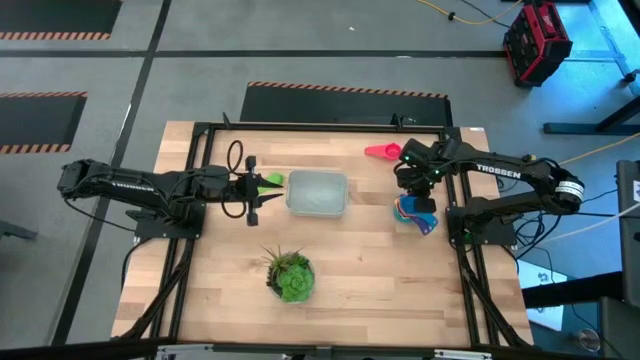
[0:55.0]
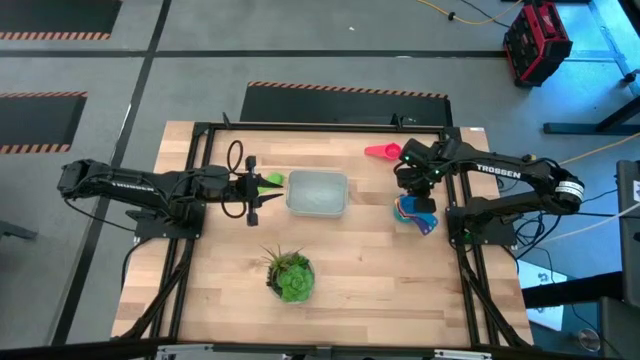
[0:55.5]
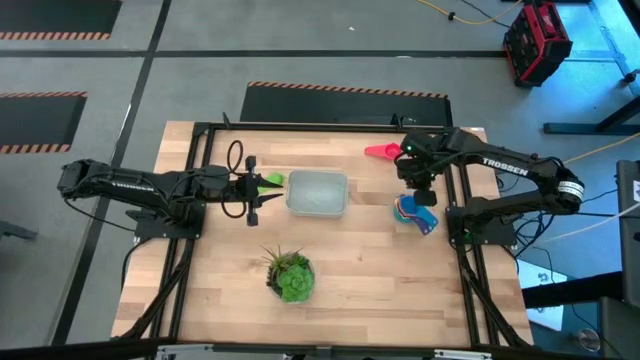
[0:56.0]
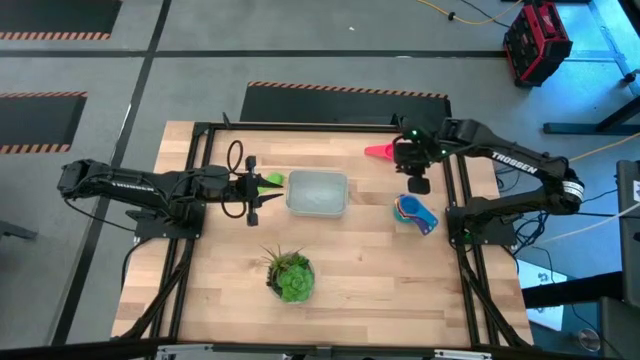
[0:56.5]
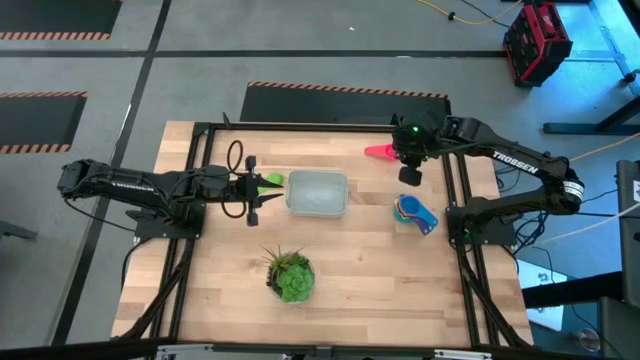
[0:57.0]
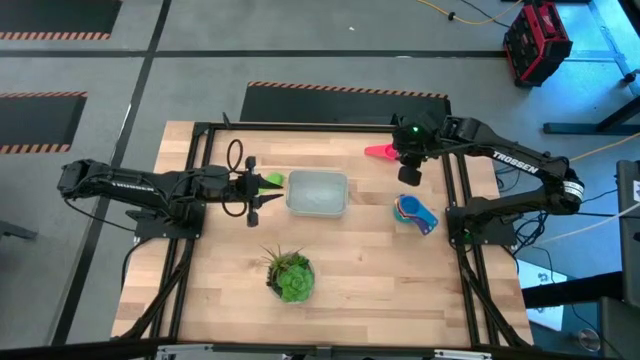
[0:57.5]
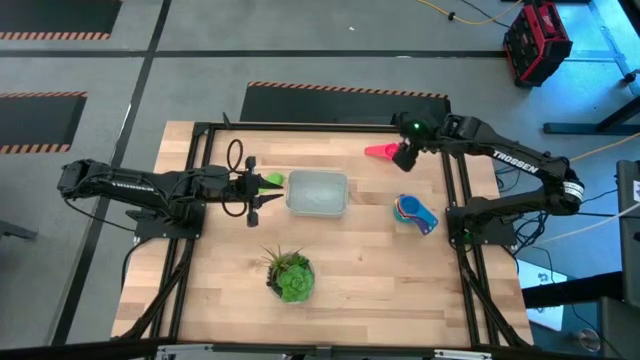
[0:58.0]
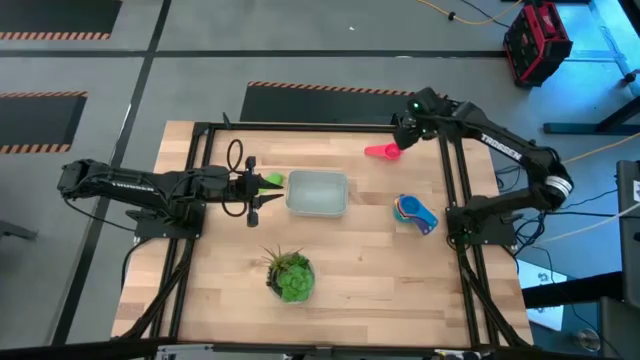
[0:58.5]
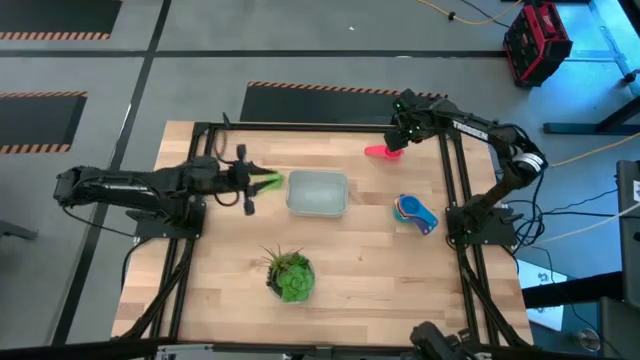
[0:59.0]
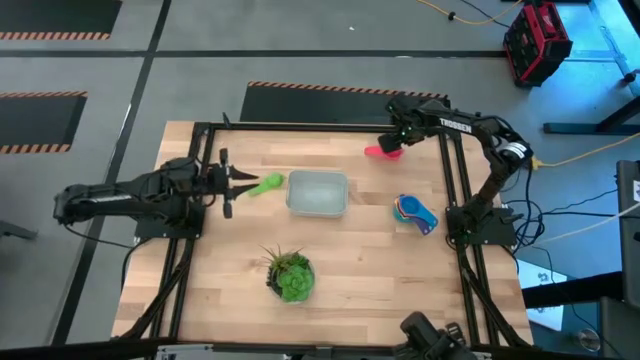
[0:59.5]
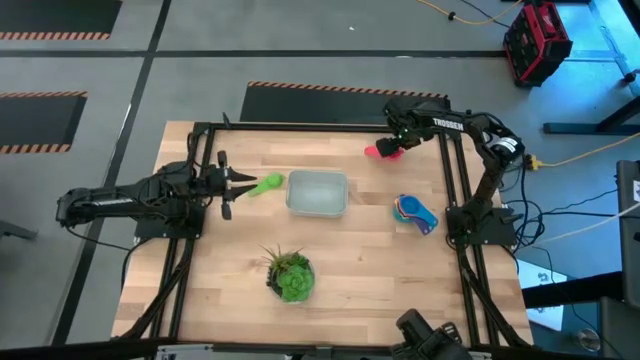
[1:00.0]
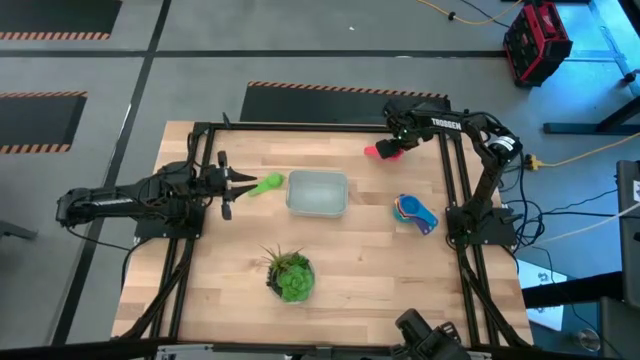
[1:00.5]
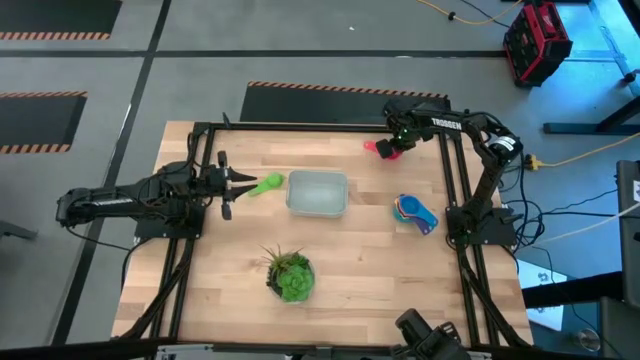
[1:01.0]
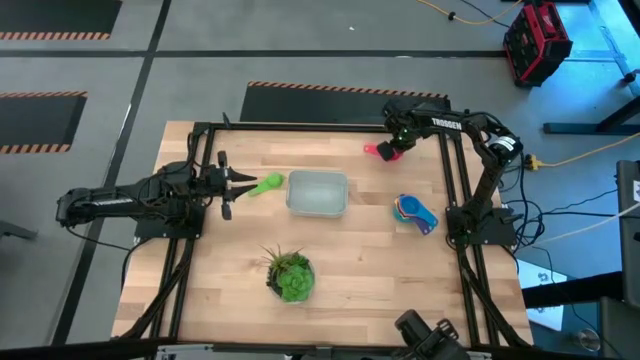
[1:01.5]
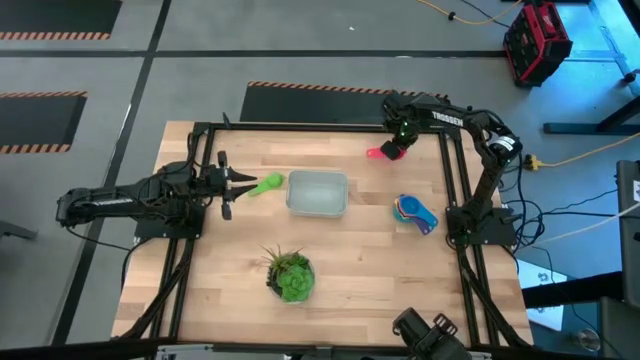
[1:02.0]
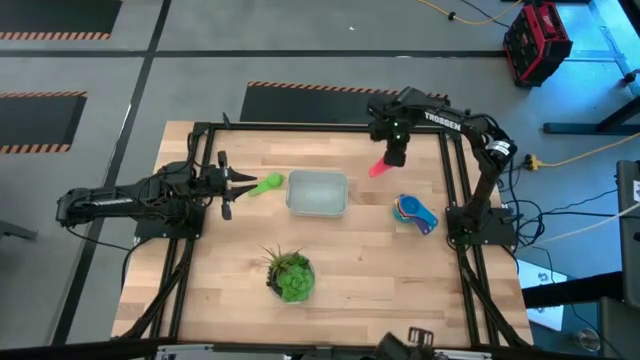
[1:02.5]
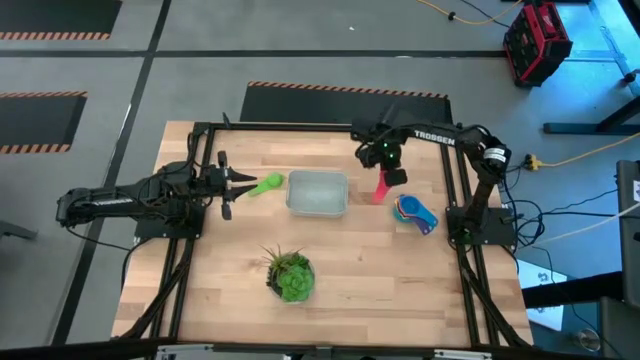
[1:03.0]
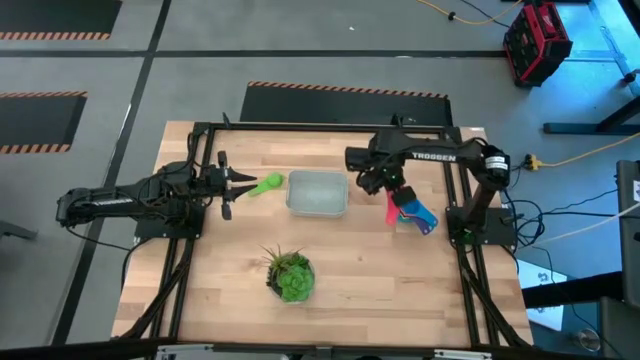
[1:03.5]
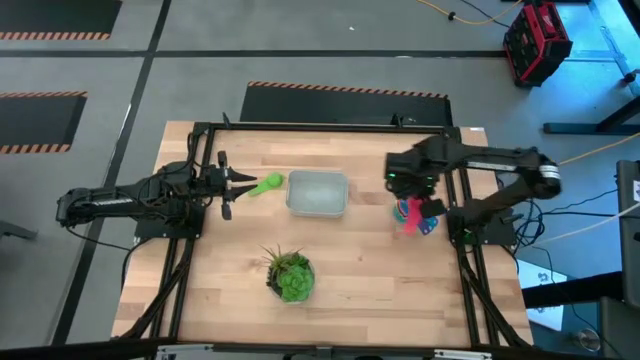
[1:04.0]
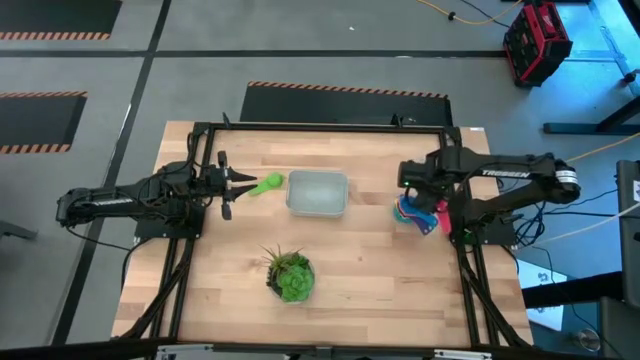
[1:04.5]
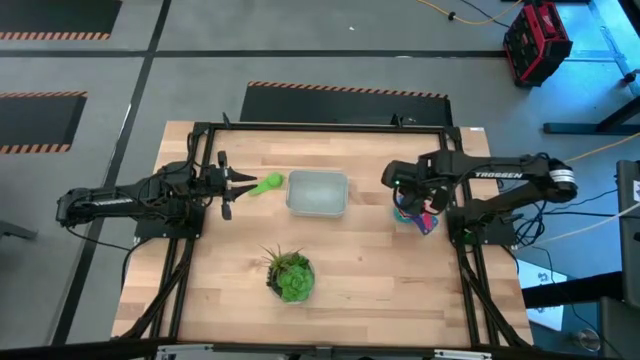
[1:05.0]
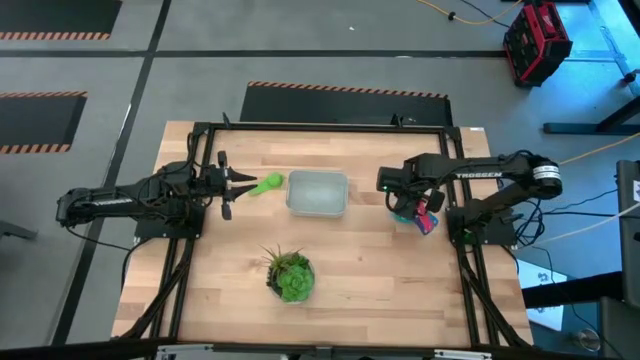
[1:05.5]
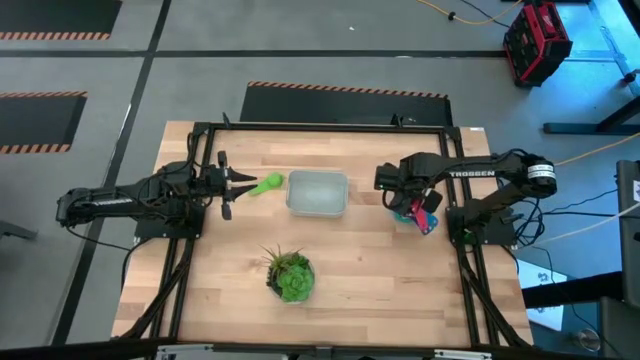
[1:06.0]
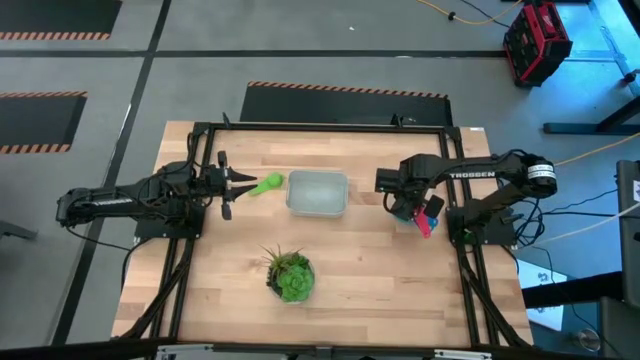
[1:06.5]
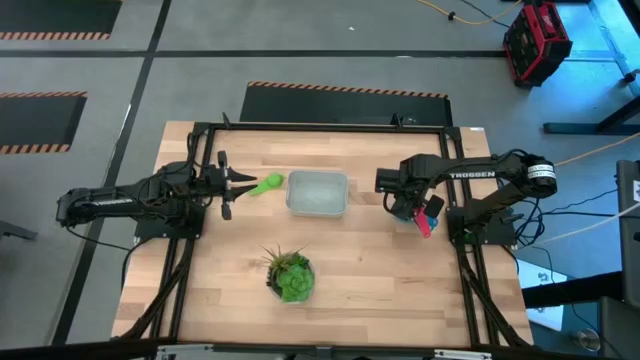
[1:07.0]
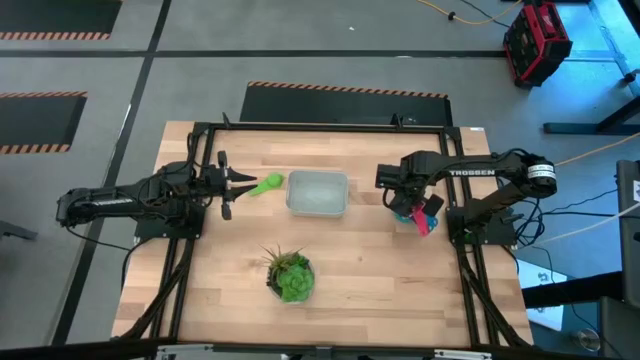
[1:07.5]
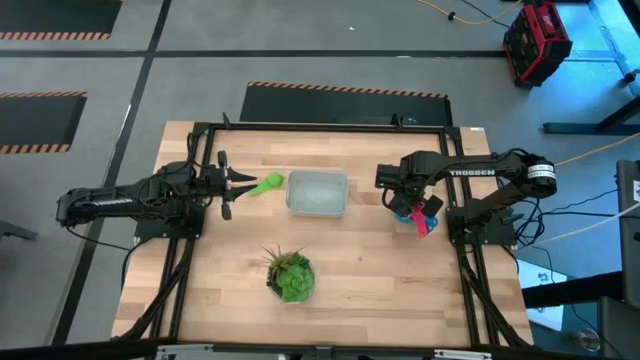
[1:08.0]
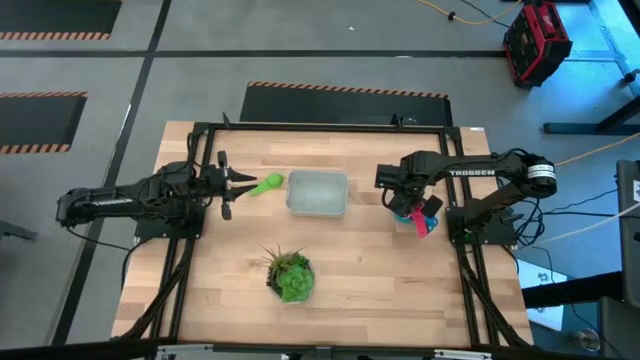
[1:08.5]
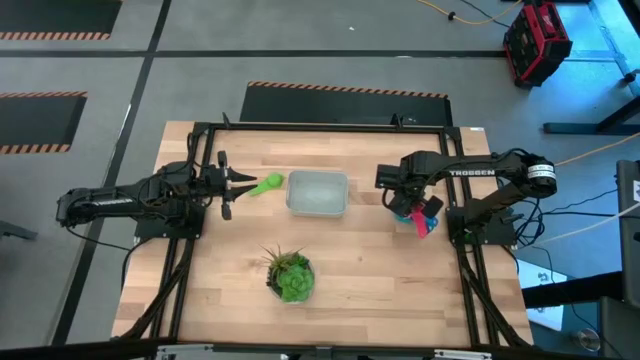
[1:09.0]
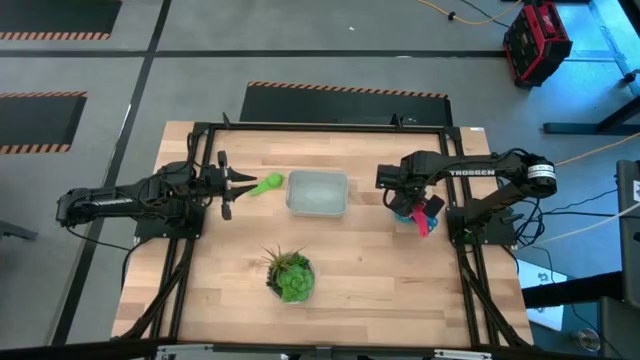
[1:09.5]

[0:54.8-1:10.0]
Task: Nest measuring cups in basket
Stack the red measuring cup on top of the the blue measuring cup

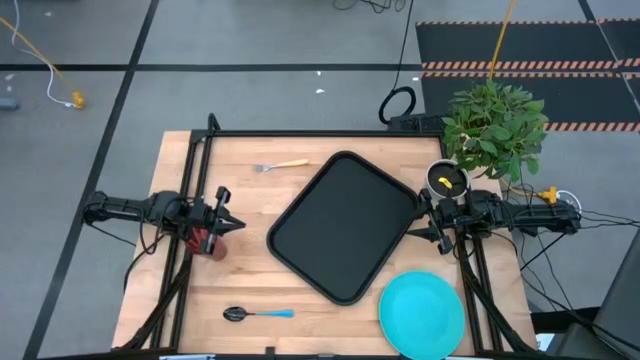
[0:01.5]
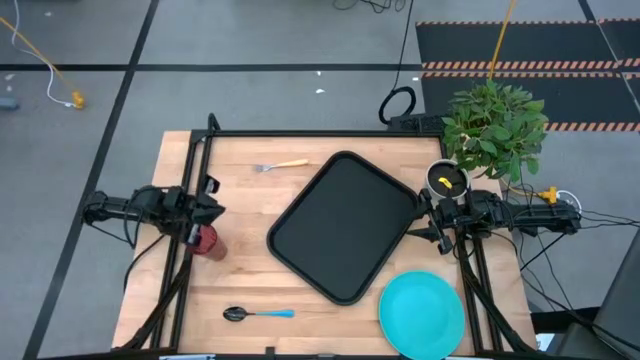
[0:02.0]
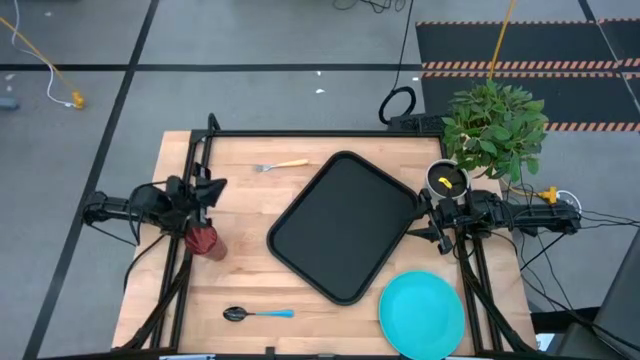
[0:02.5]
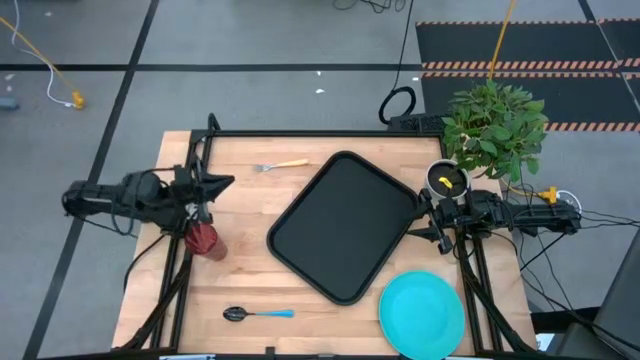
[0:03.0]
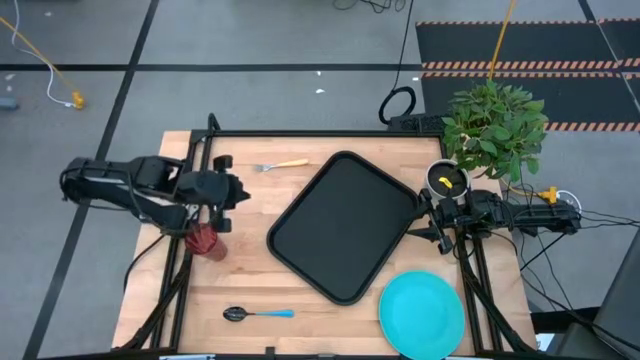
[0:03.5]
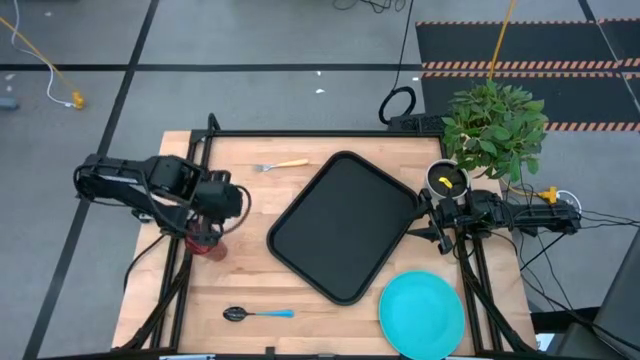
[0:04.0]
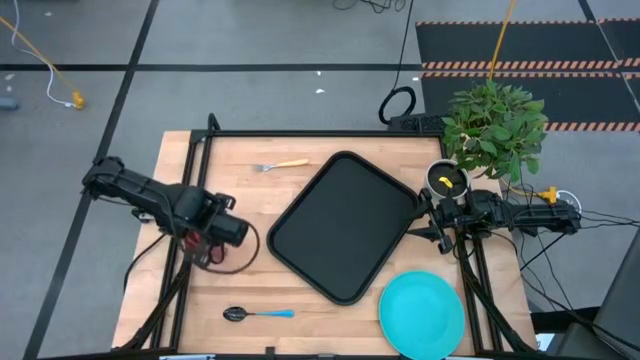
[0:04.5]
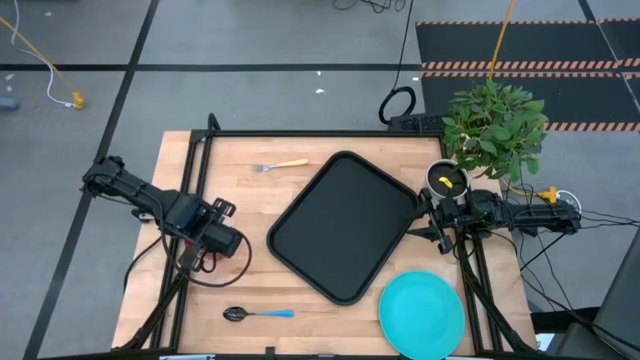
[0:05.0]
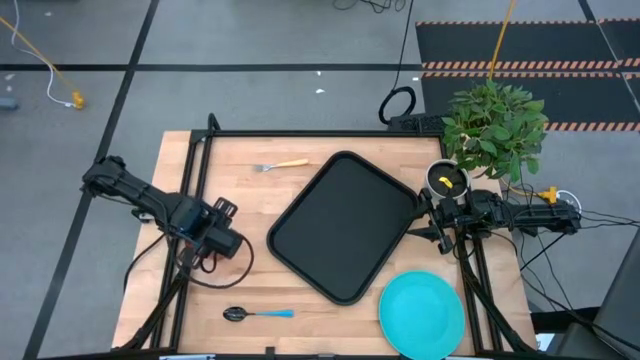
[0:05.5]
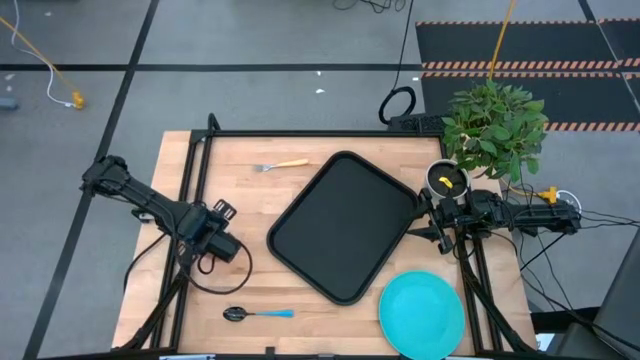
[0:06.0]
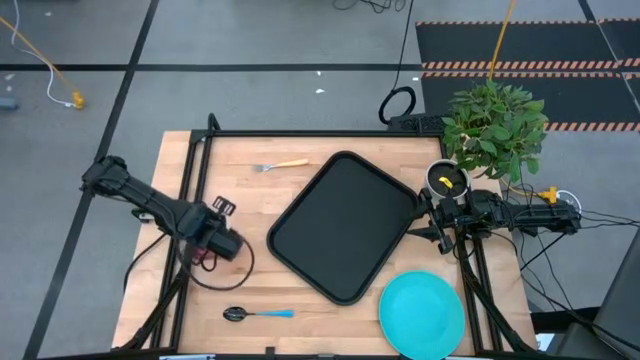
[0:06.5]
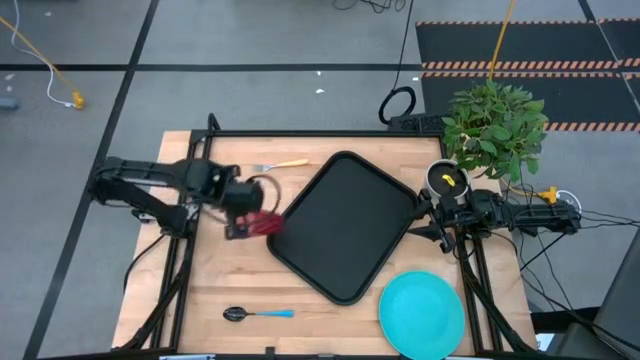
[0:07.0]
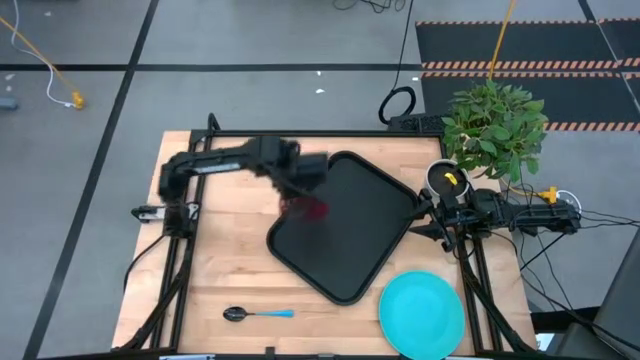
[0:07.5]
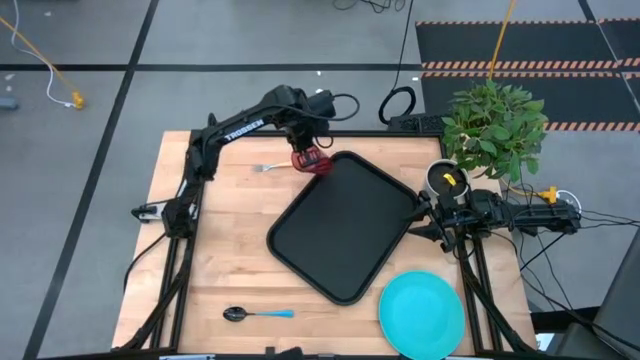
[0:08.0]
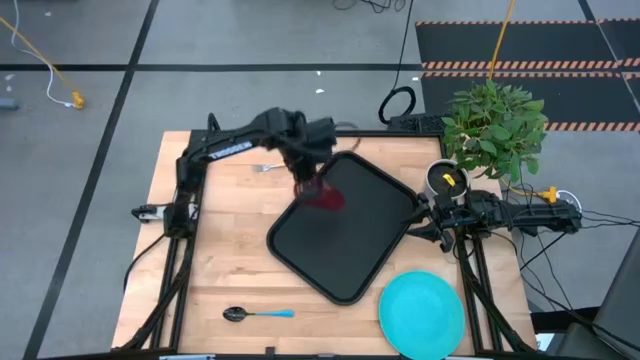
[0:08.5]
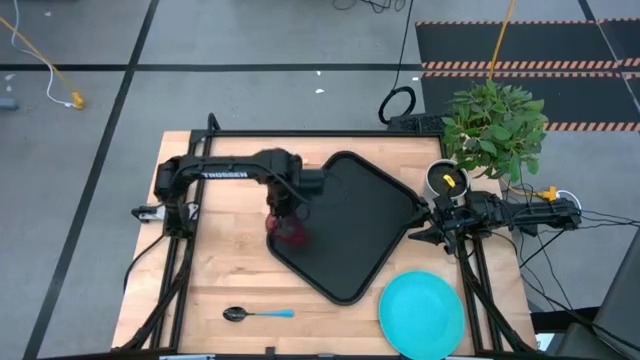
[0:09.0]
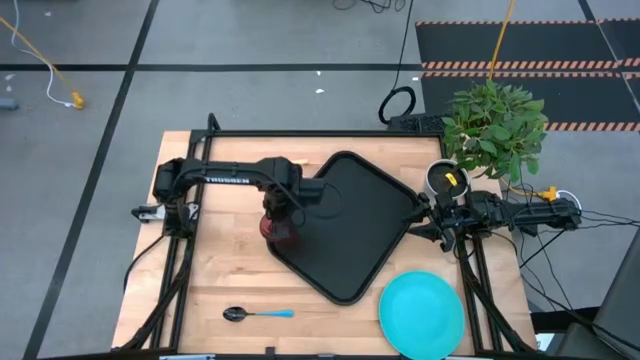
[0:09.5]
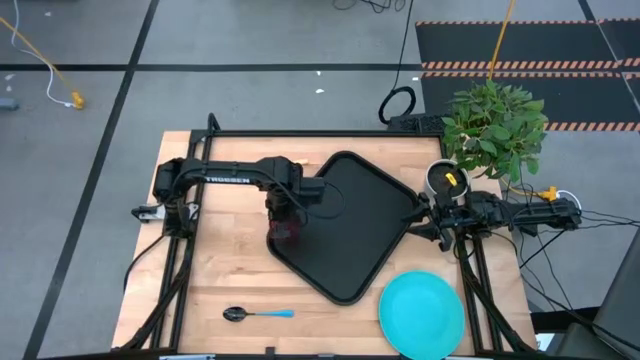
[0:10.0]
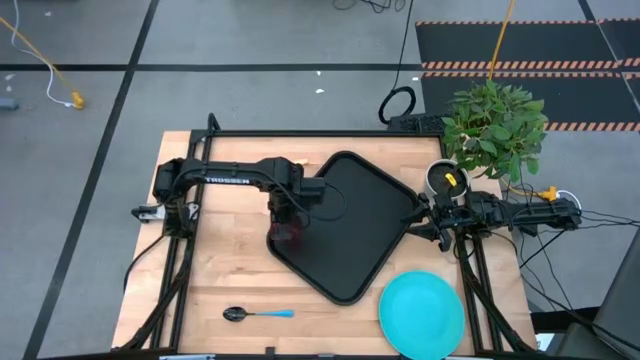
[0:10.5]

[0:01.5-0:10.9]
Task: Pick and place plate/cup/fork/spoon on tray
Put the red glass on the black serving tray
